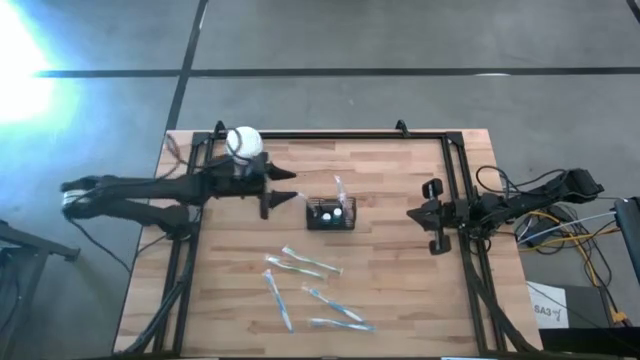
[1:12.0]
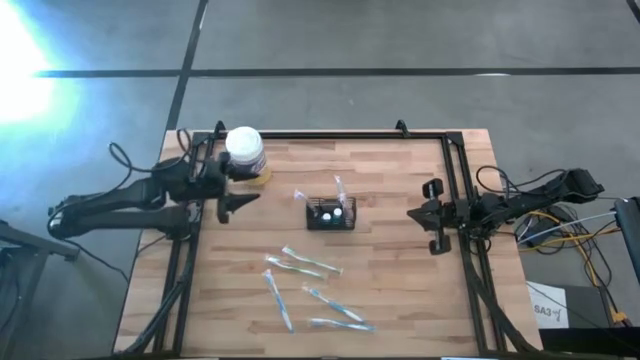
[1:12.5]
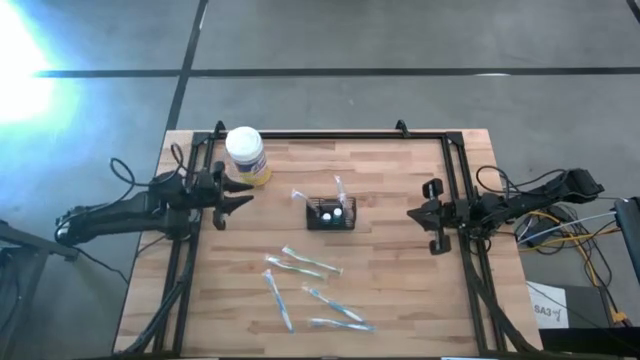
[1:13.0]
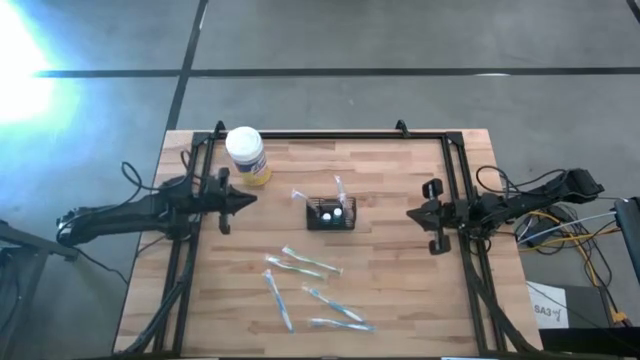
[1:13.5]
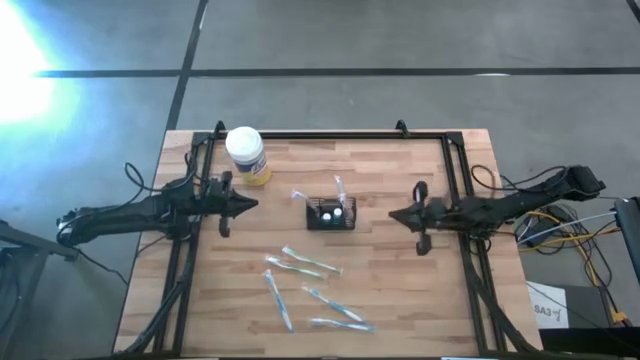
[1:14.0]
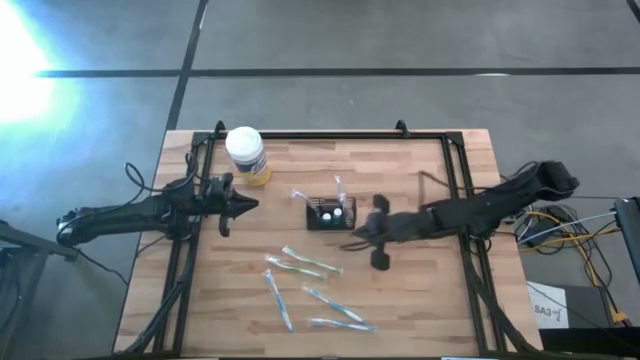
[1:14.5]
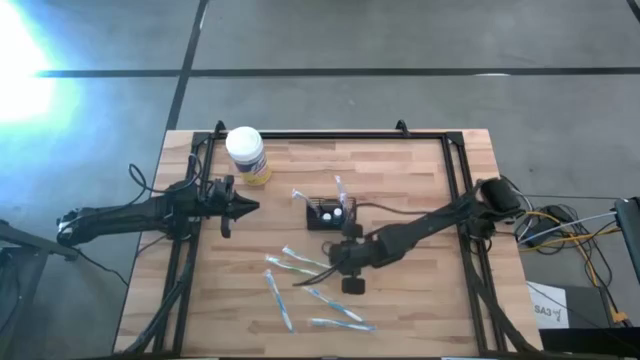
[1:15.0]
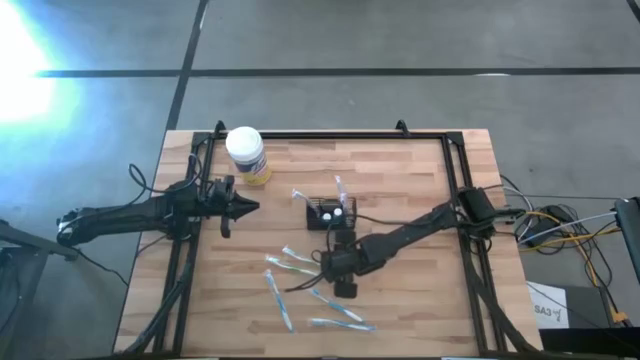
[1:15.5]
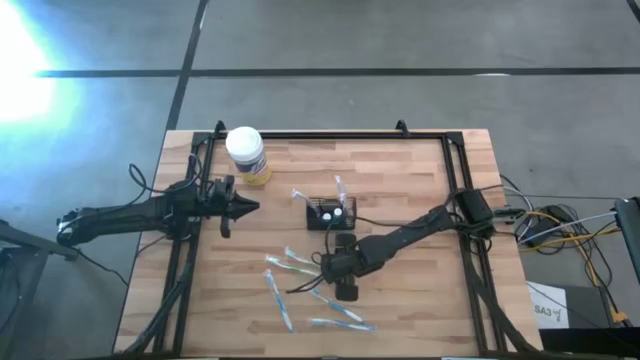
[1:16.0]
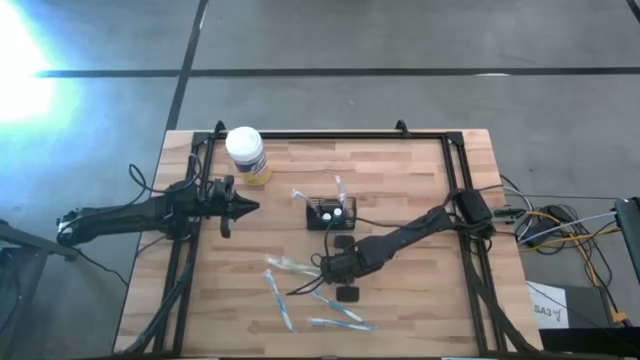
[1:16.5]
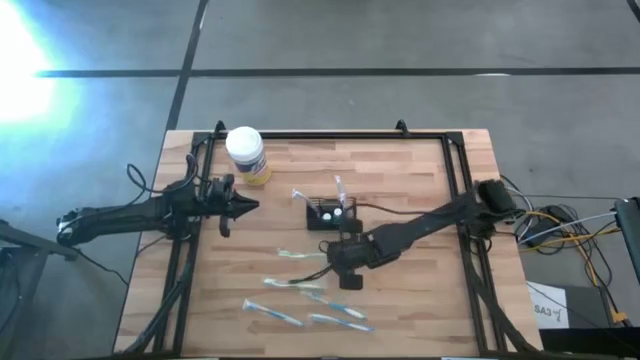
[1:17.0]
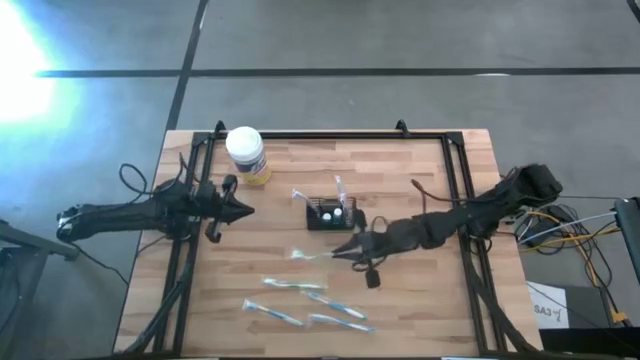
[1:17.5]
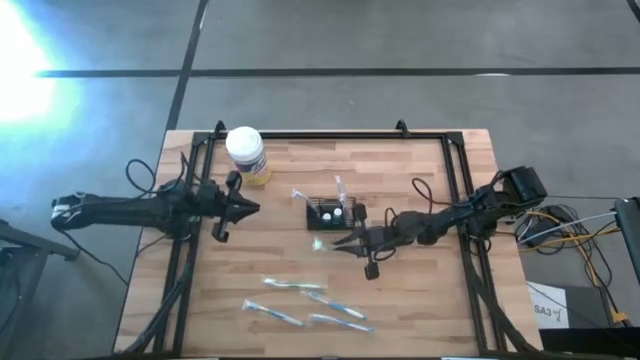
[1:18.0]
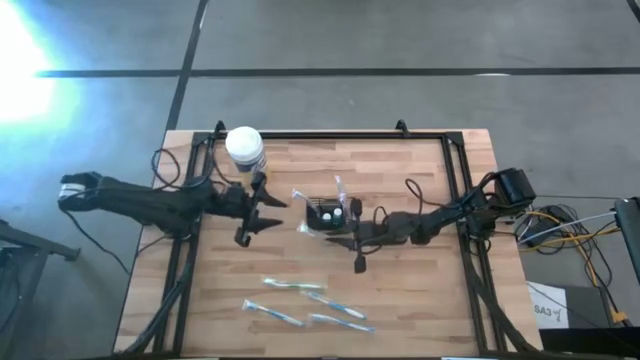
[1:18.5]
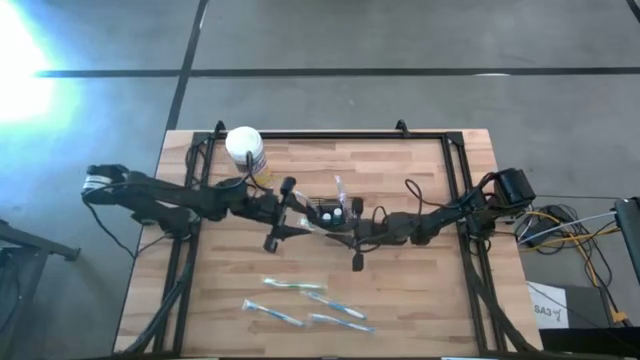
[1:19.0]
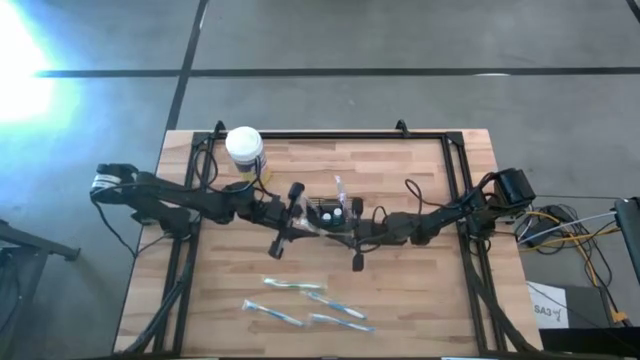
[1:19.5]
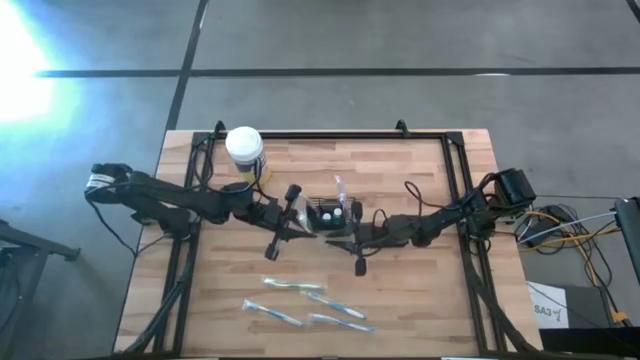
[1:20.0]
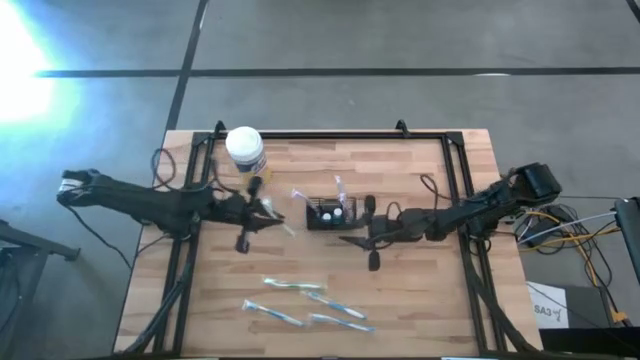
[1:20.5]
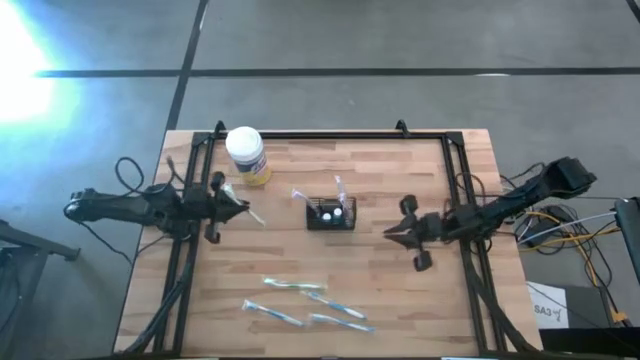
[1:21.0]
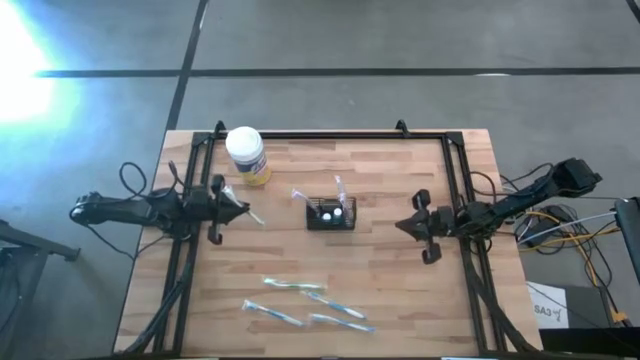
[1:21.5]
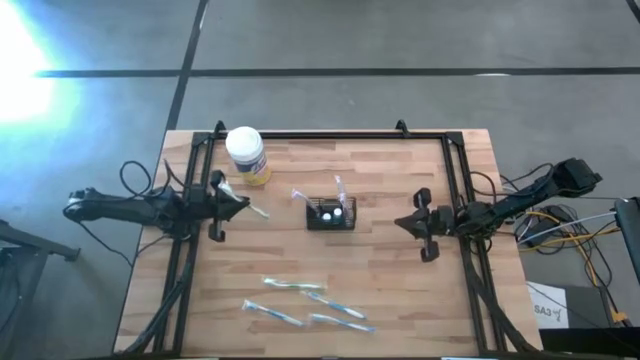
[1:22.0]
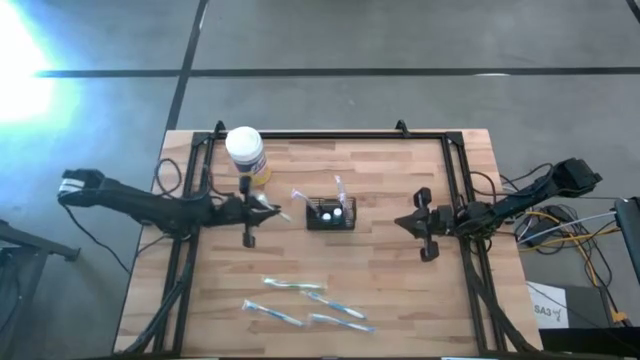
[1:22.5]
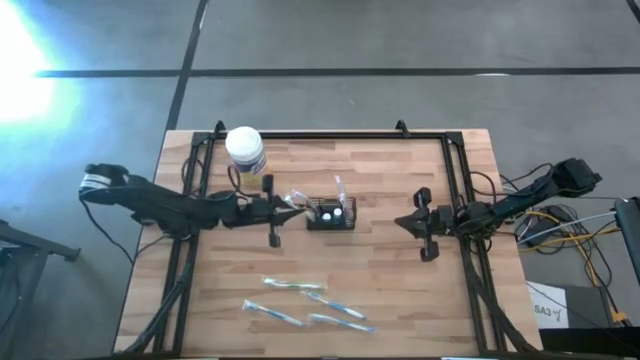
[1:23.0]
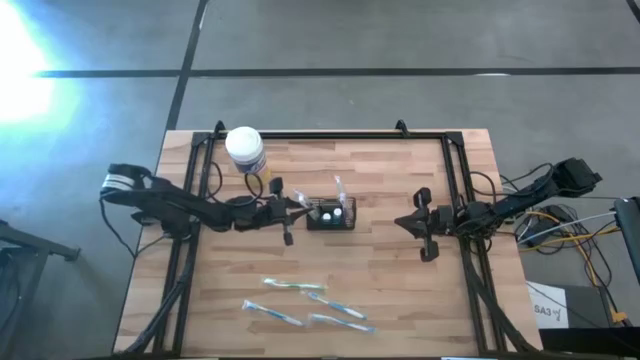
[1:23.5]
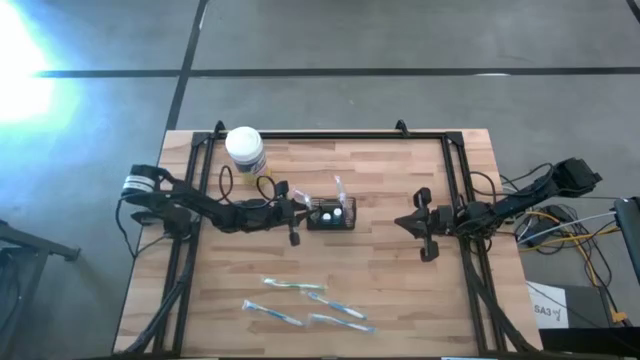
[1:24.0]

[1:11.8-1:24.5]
Task: Pick & Place toothbrushing station
Put the top green toothbrush into the wire organizer

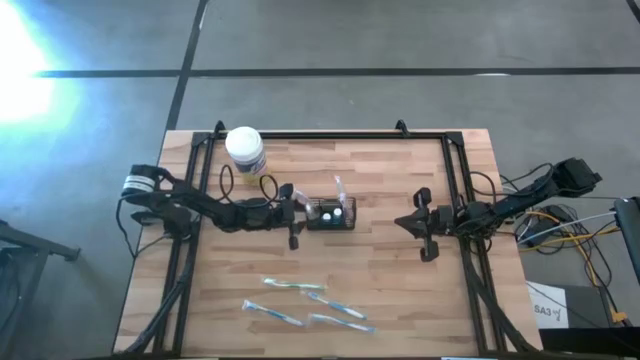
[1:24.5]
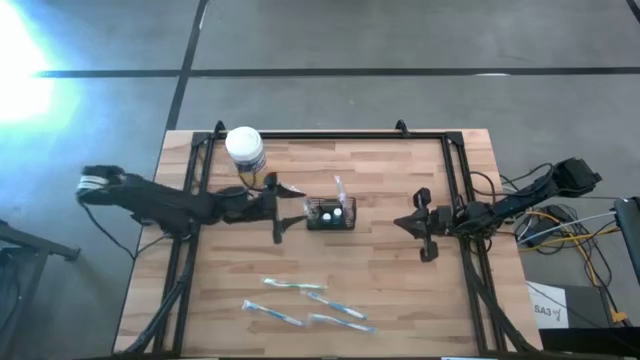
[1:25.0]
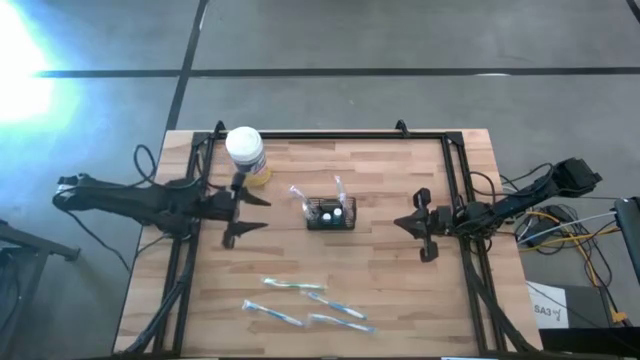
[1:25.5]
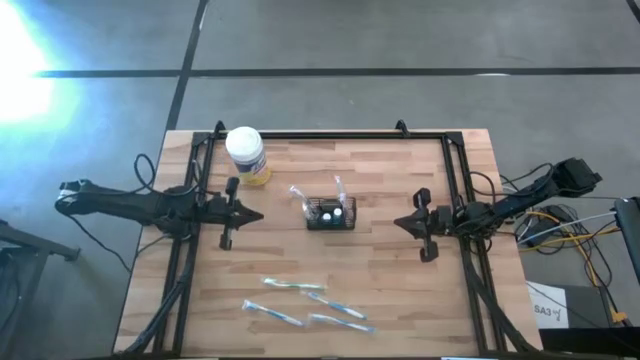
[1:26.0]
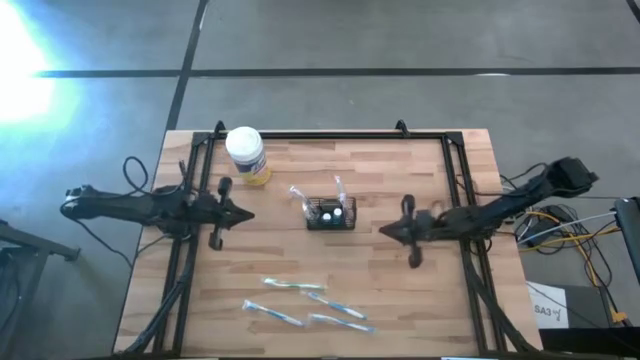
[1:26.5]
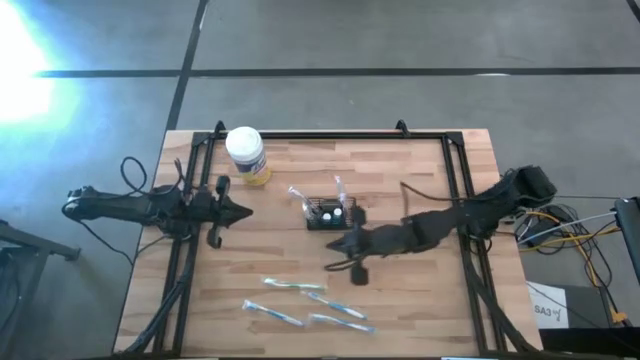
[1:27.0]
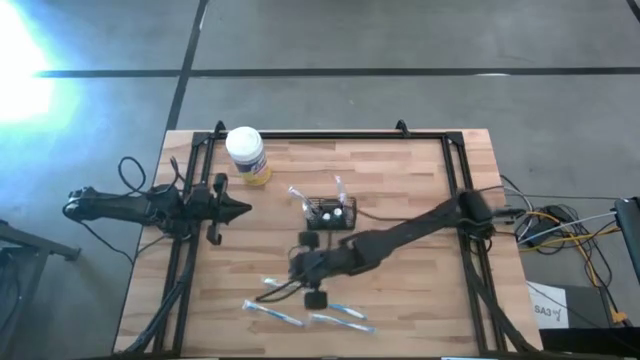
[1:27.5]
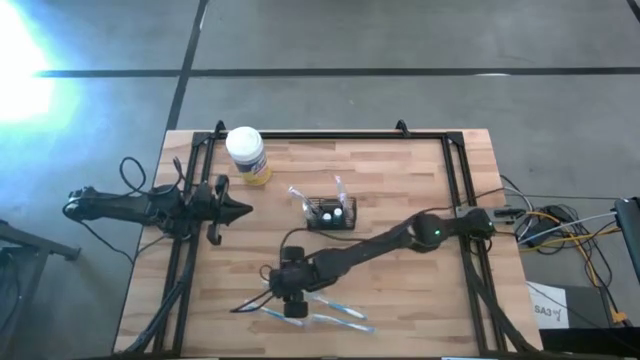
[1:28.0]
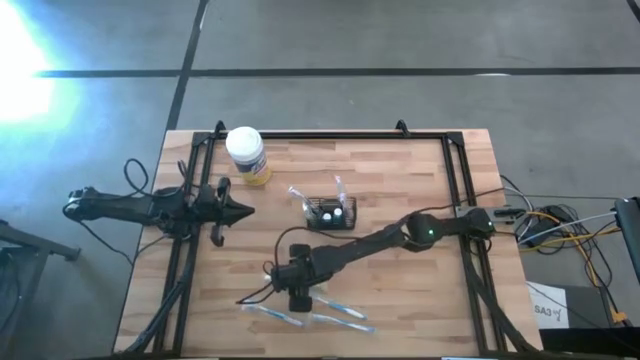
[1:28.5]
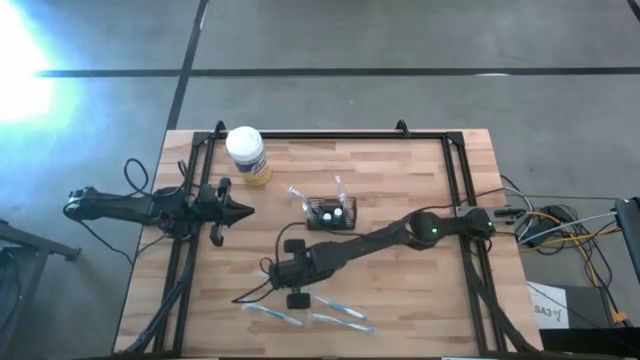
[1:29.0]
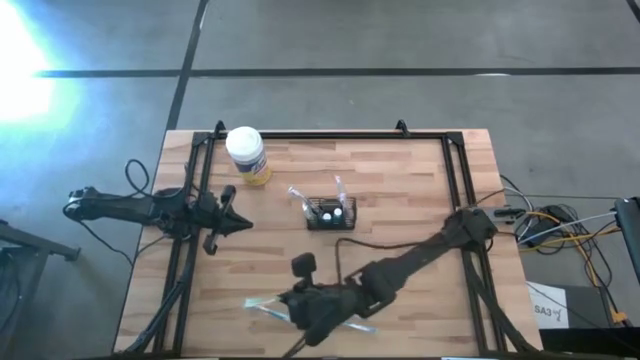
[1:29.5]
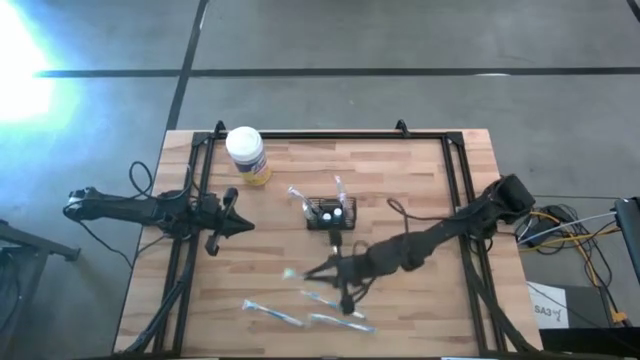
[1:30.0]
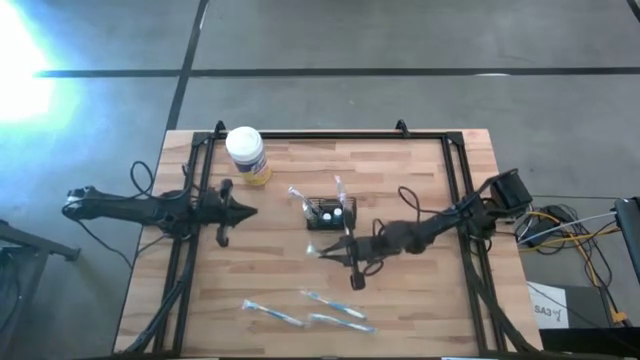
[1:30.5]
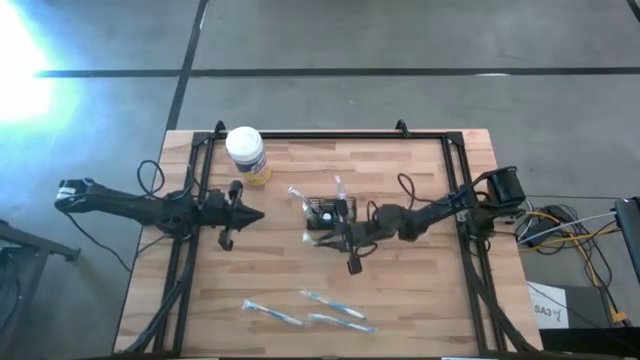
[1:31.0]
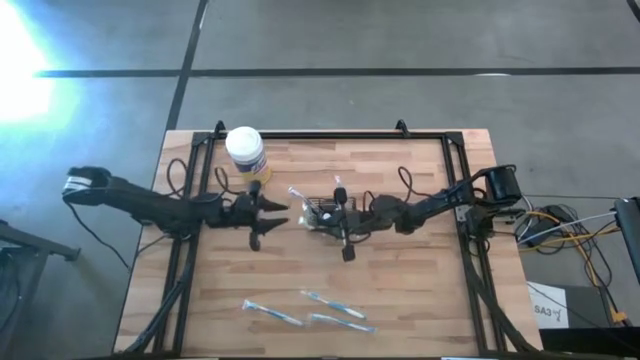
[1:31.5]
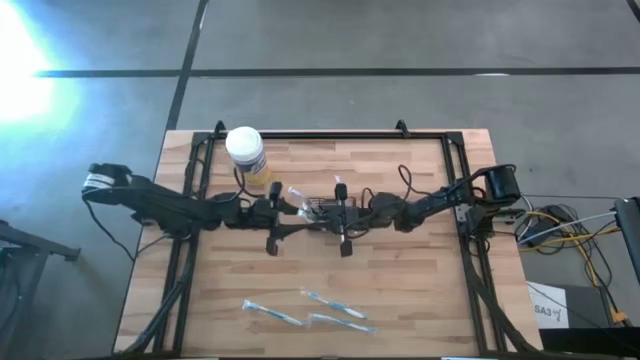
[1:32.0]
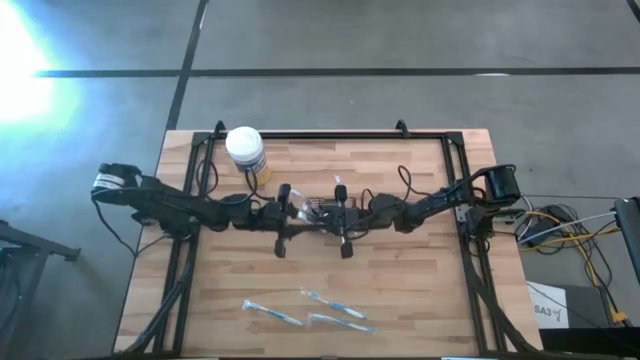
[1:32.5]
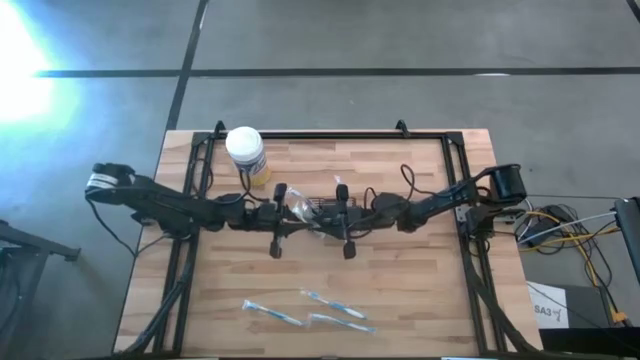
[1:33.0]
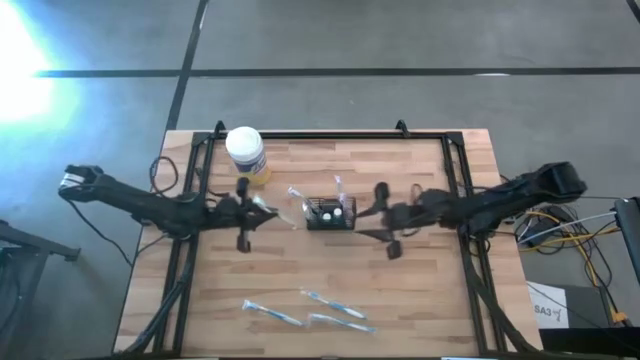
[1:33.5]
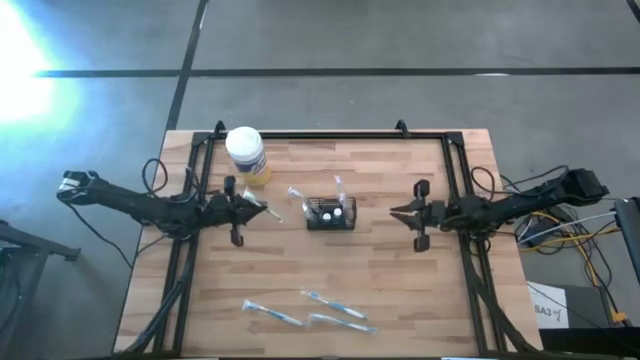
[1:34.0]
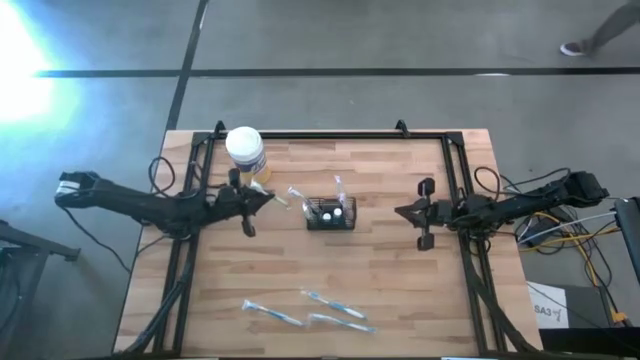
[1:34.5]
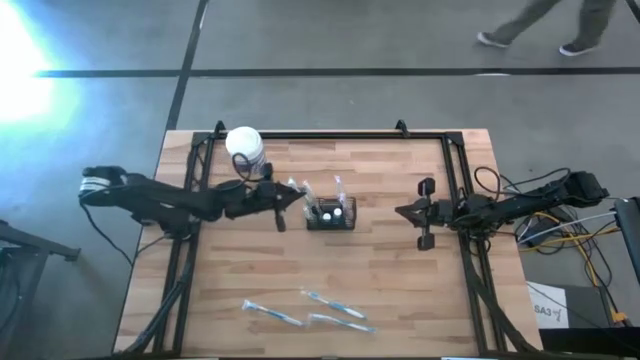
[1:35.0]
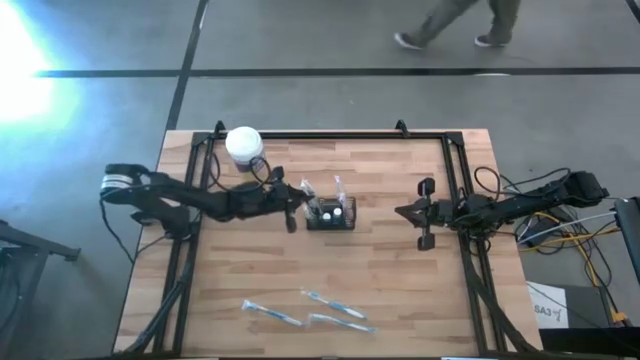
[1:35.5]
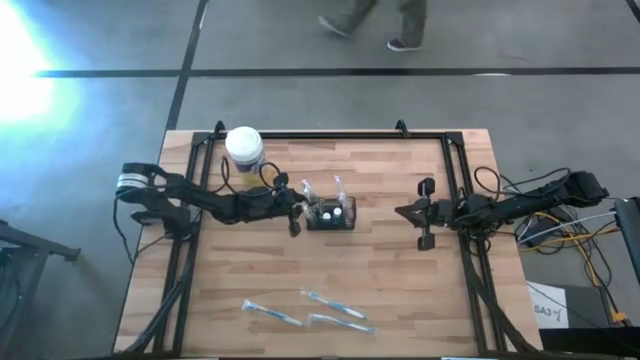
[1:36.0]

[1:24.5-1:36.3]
Put the green toothbrush into the wire organizer
